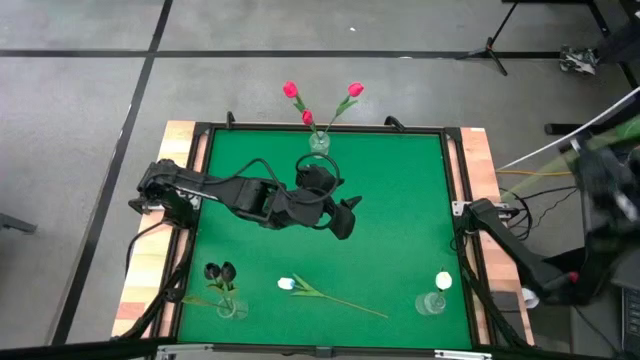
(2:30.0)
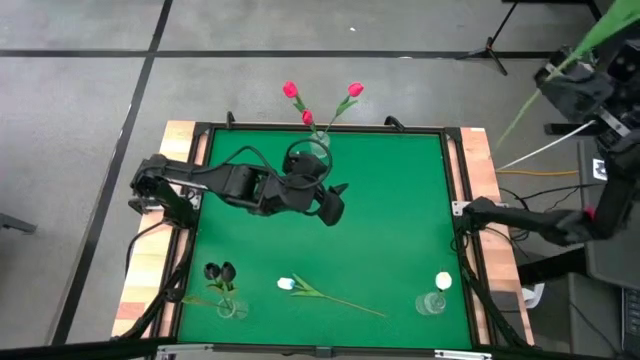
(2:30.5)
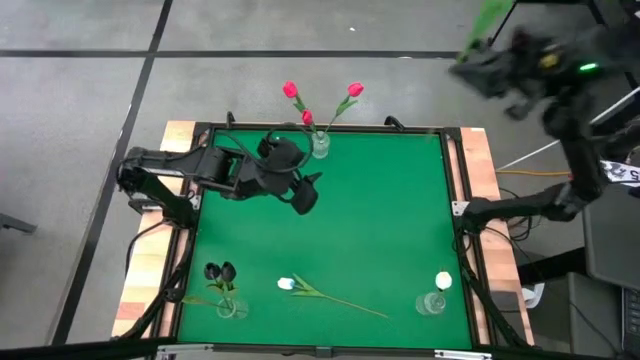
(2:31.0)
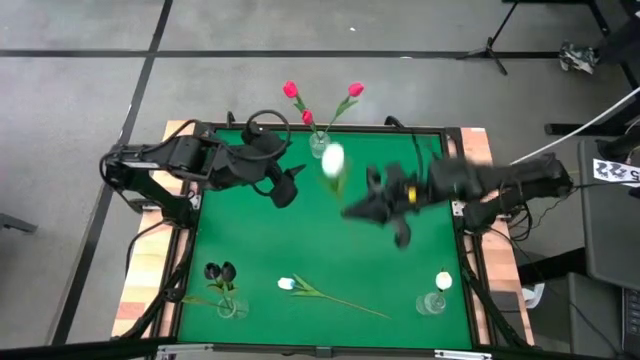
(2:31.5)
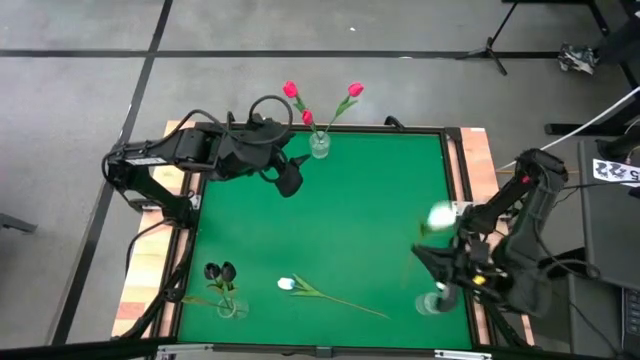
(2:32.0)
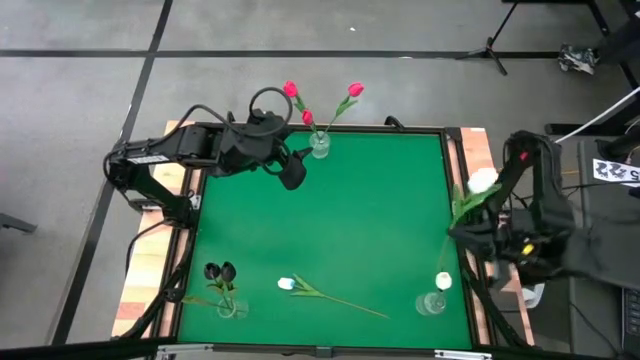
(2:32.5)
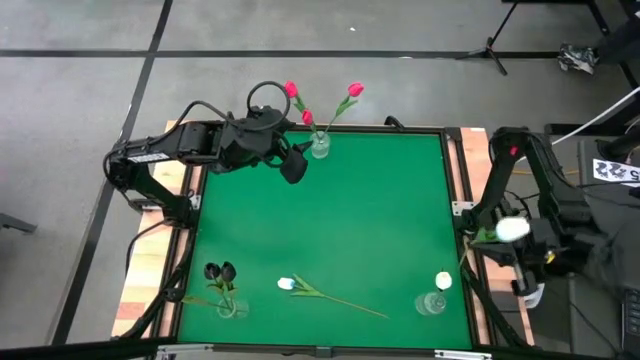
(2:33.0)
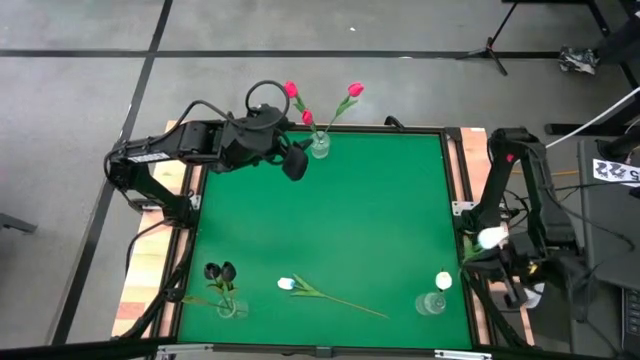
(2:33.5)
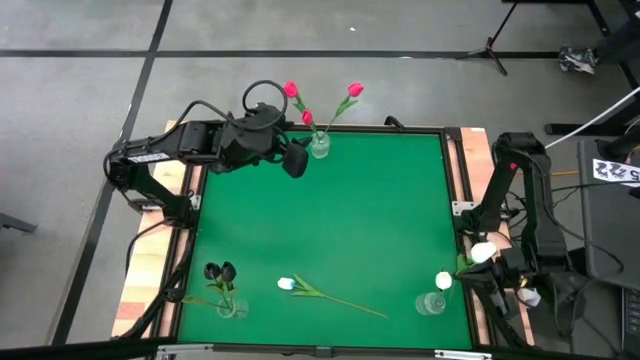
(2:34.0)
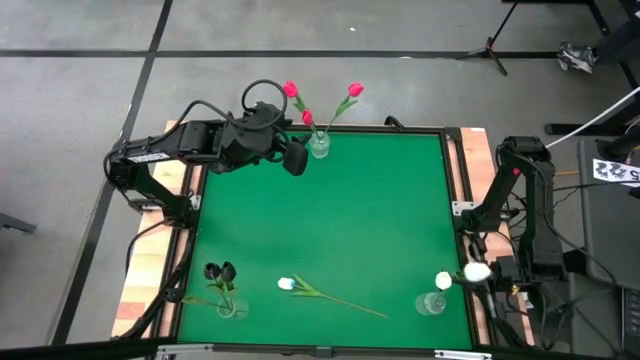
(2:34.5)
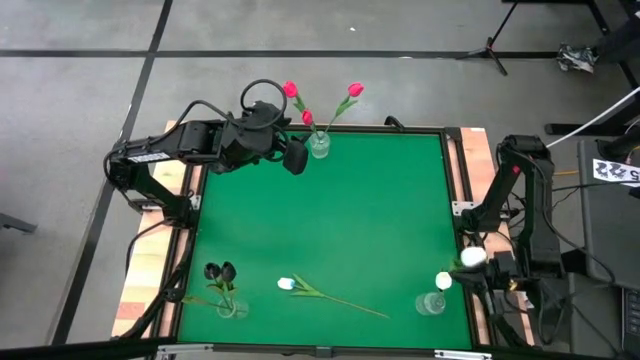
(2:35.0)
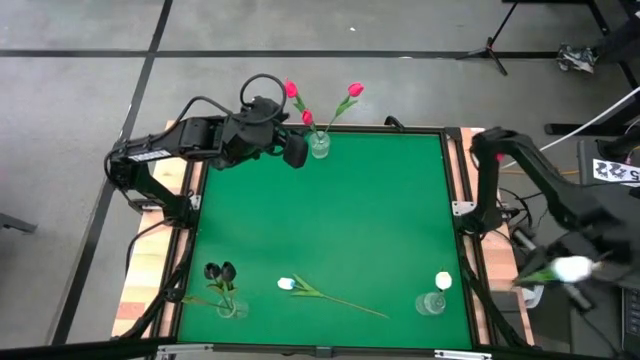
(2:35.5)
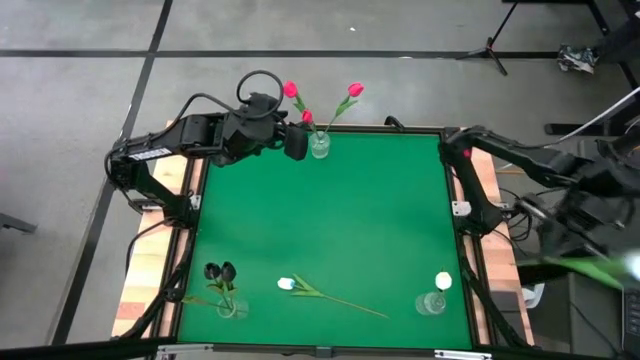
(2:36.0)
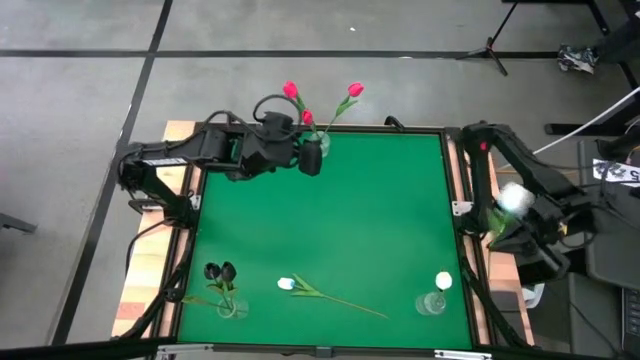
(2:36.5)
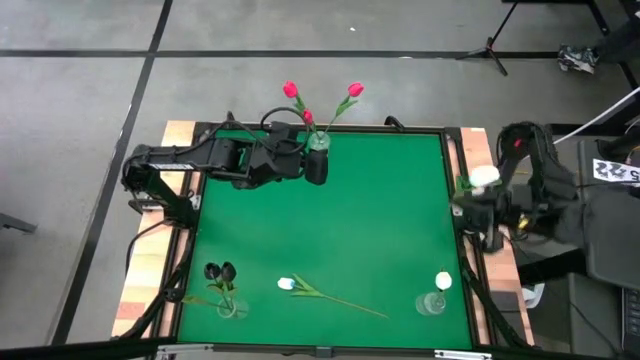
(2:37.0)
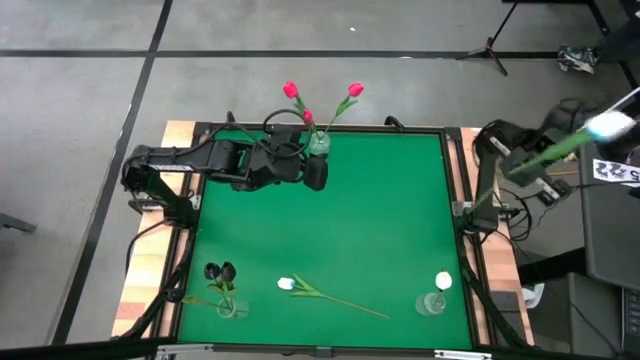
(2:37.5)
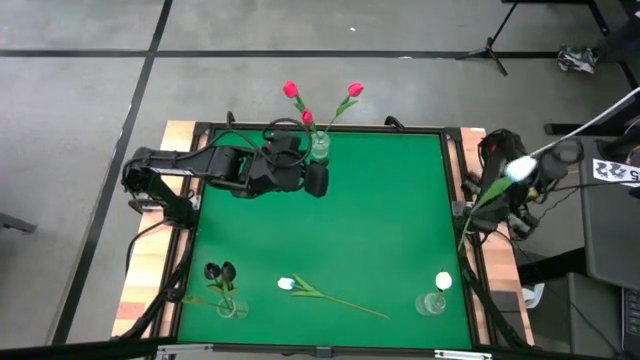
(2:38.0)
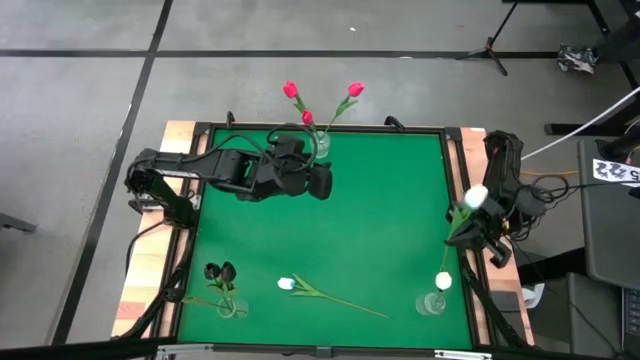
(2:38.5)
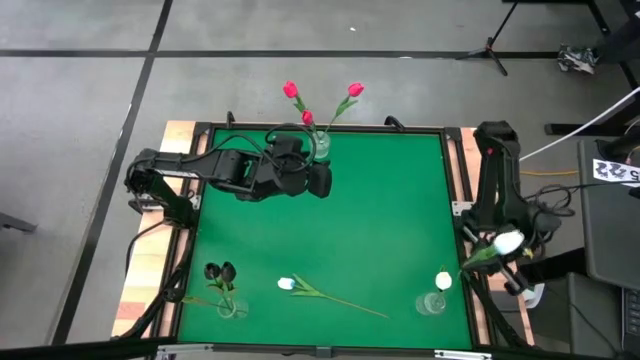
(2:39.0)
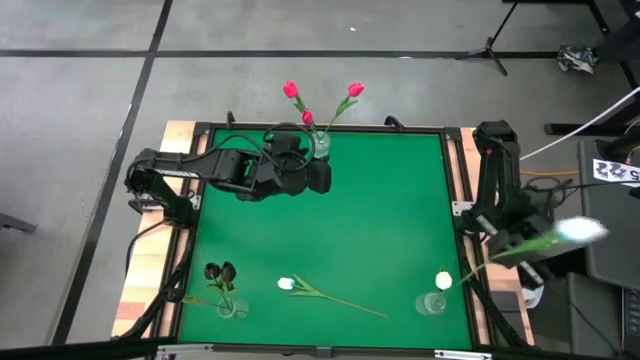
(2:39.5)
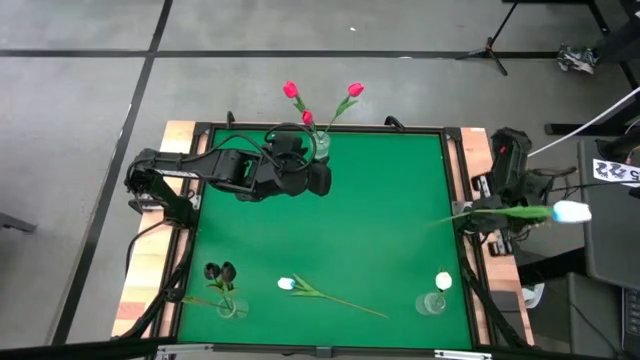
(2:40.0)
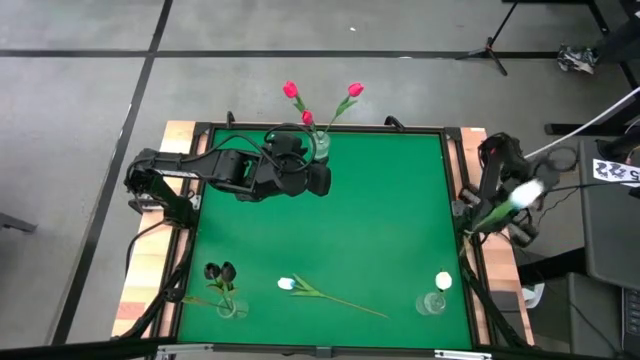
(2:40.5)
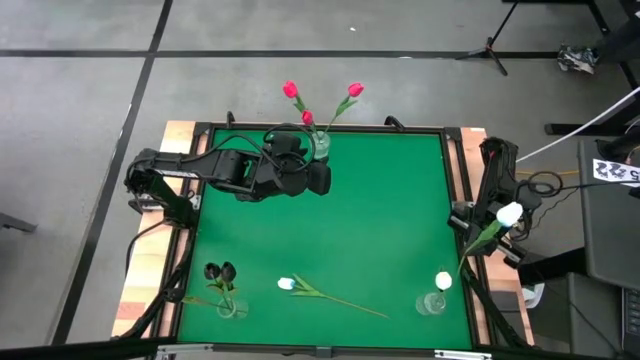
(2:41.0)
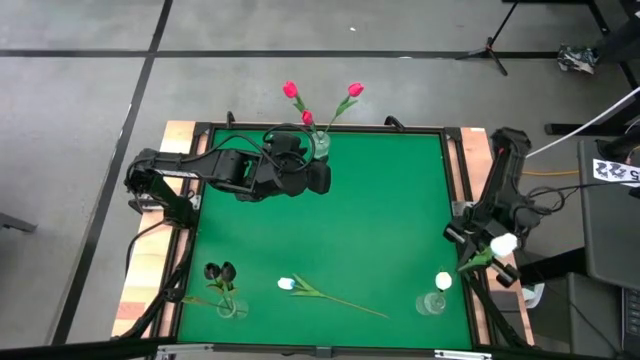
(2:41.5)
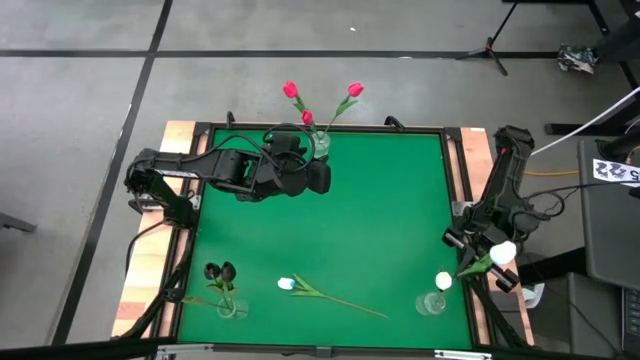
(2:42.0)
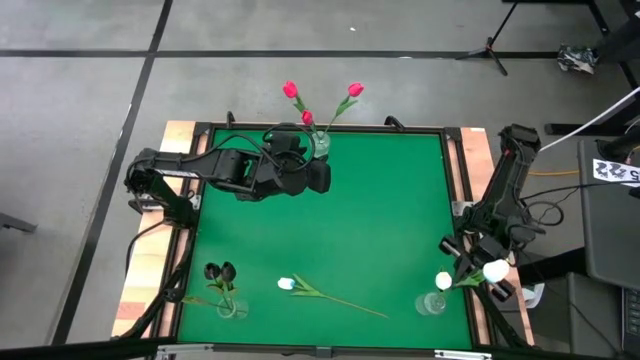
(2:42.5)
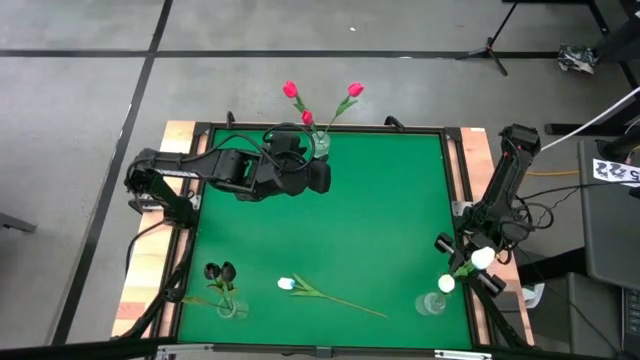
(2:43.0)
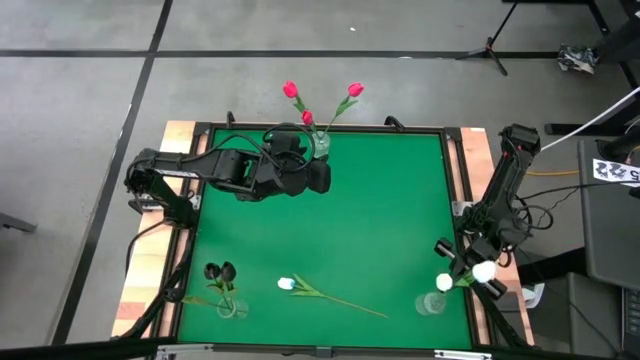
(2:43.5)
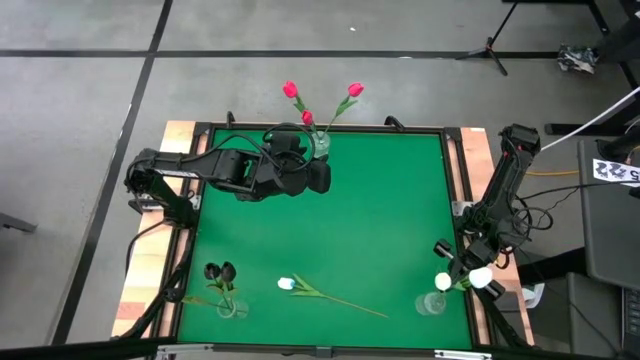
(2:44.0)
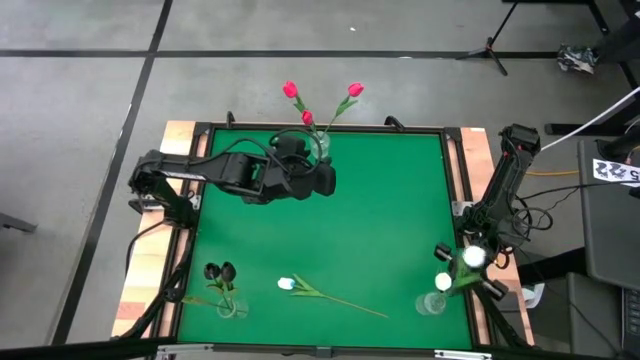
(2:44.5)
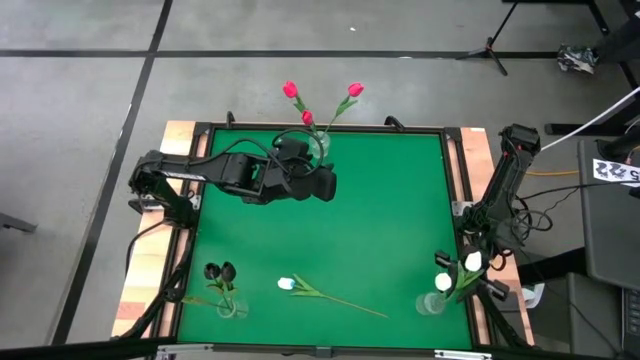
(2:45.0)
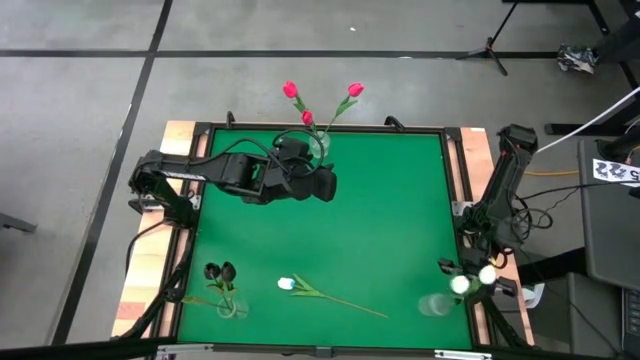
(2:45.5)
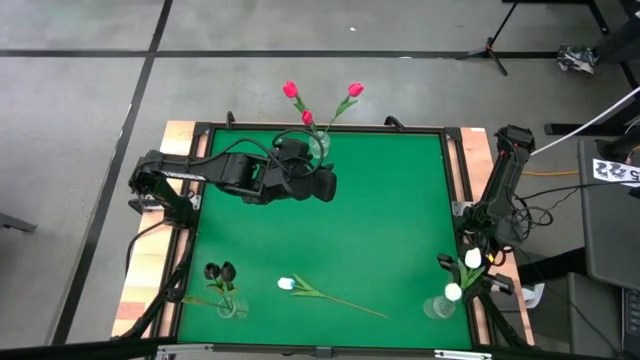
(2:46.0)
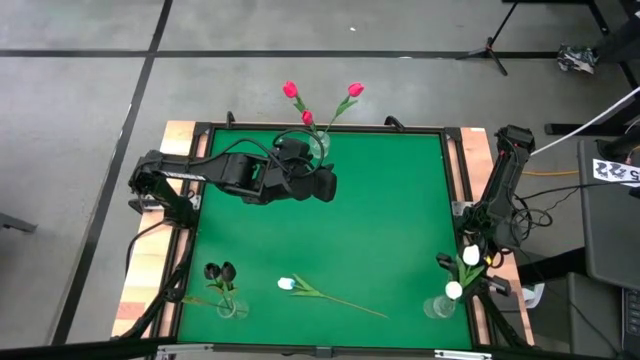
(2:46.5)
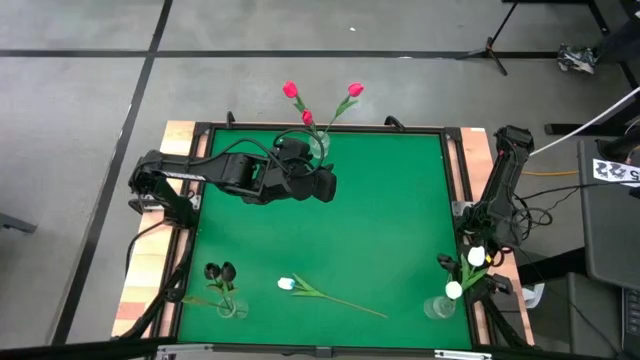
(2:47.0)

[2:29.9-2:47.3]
Task: Sort flowers into vase by color
Put the top white flower into the bottom right transparent vase

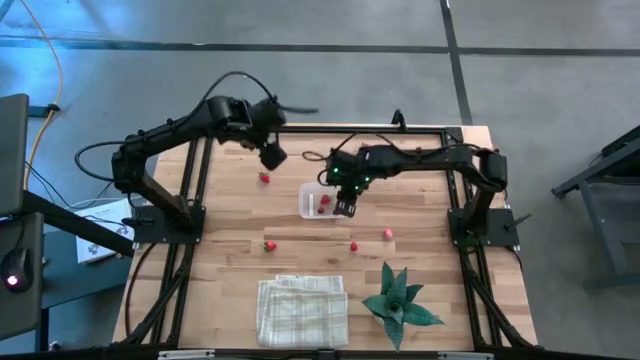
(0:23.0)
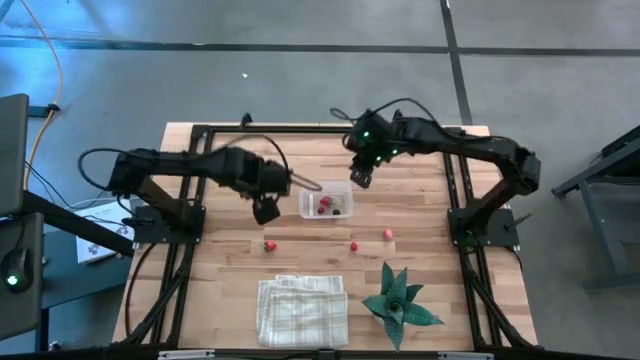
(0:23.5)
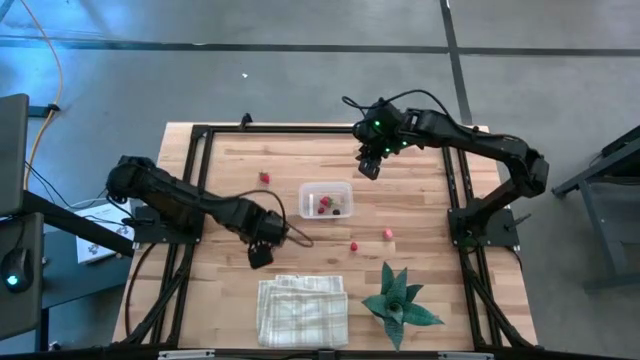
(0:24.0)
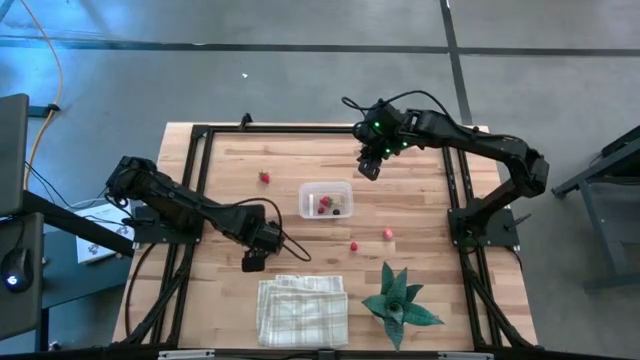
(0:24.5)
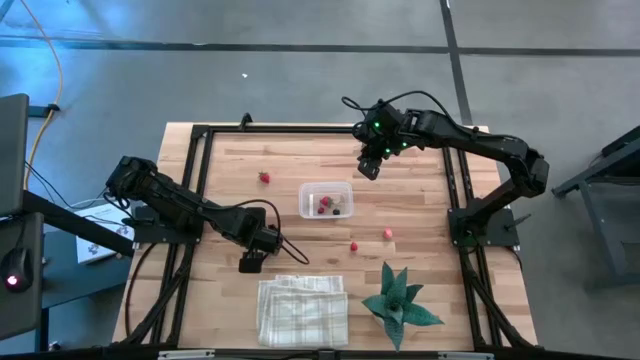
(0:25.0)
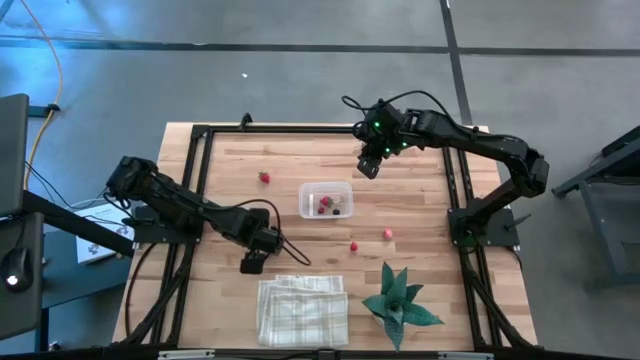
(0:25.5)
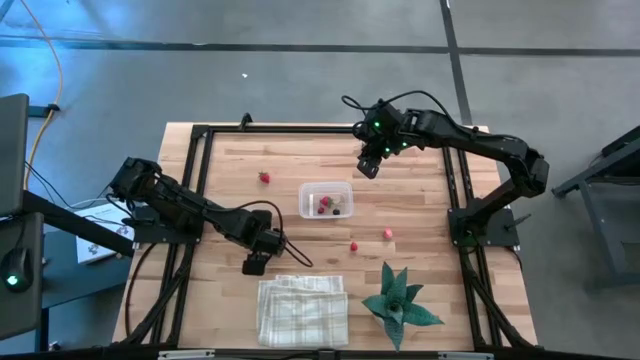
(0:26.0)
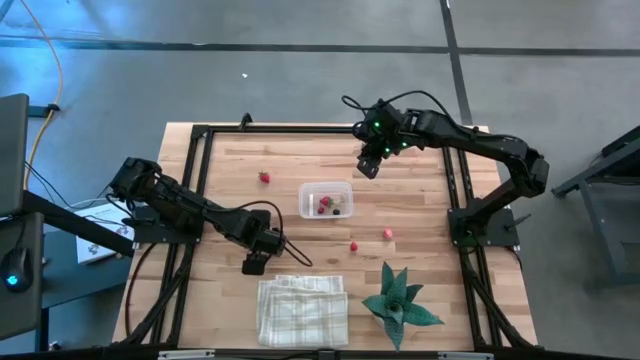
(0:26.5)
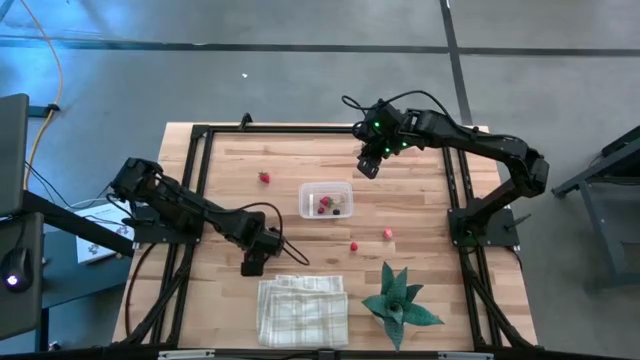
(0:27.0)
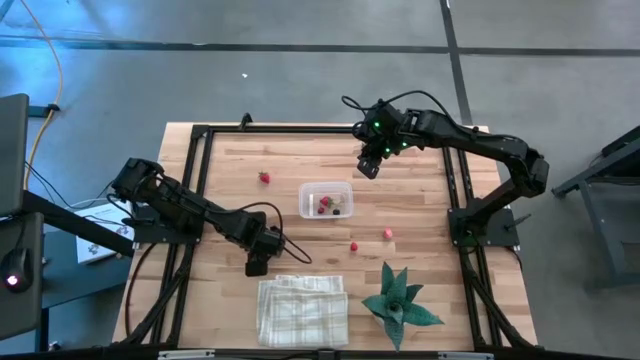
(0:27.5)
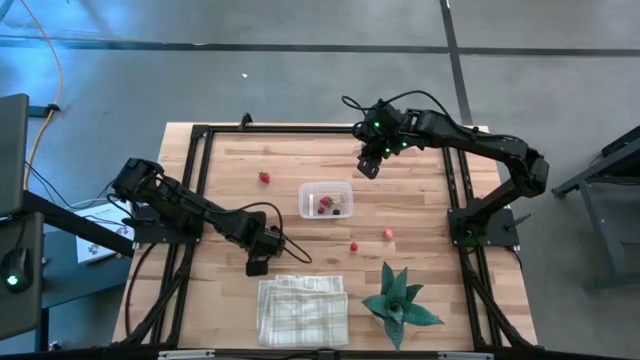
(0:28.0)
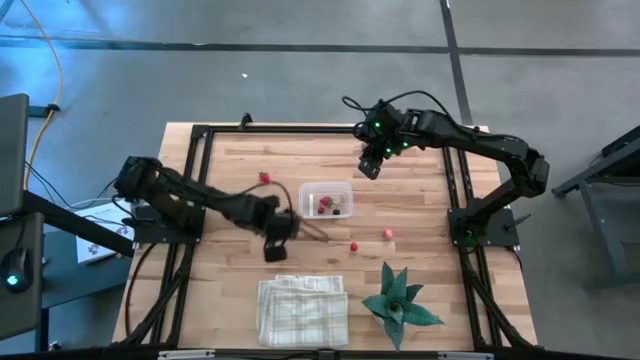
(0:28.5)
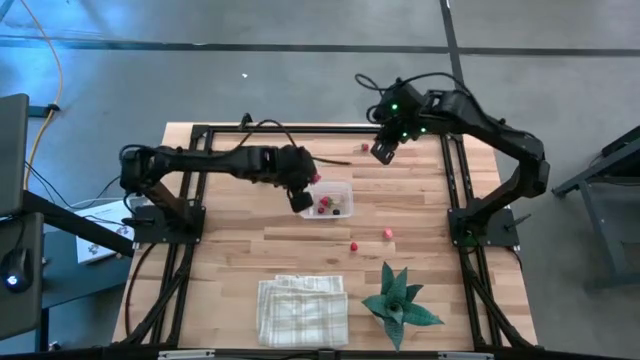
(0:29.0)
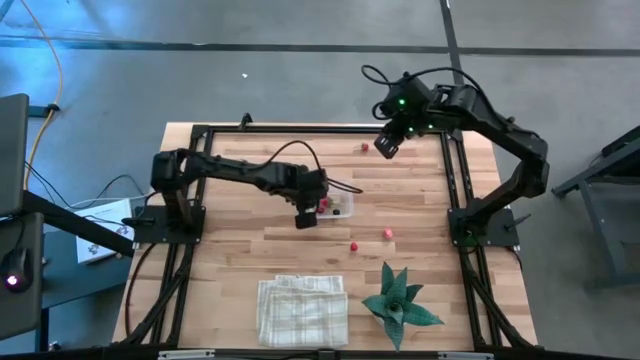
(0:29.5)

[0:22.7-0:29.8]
Task: Pick and placing Produce into tupperware
Put the bottom red strawberry into the transparent bin
